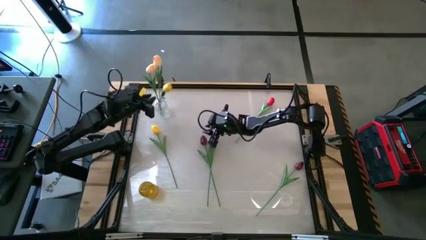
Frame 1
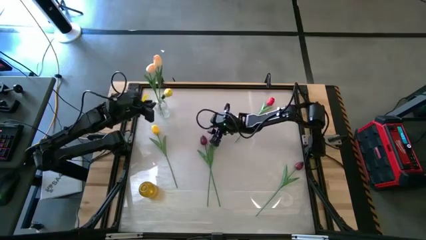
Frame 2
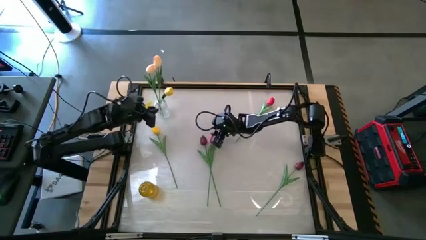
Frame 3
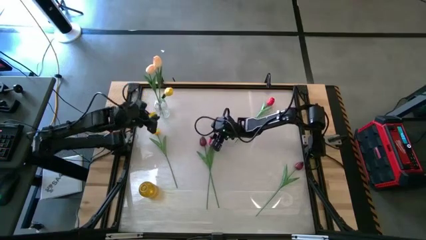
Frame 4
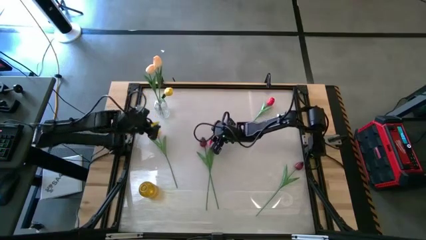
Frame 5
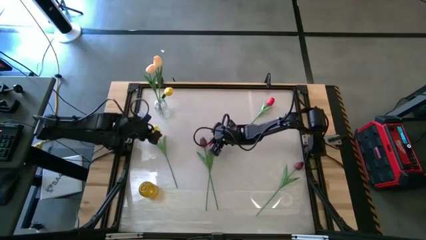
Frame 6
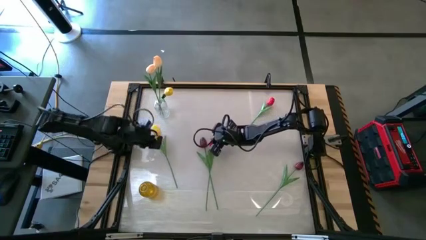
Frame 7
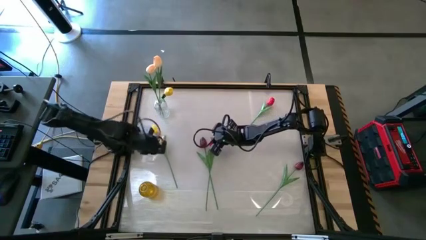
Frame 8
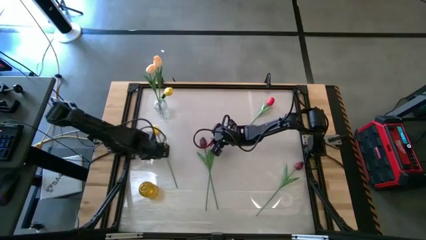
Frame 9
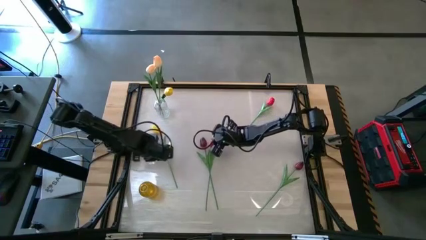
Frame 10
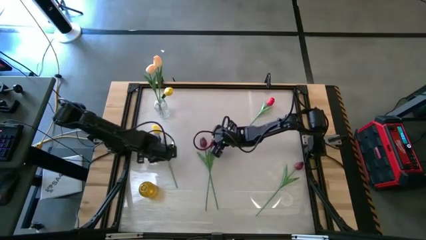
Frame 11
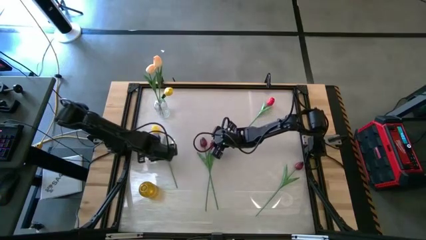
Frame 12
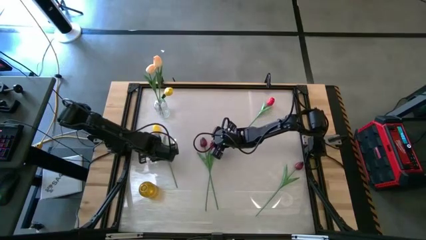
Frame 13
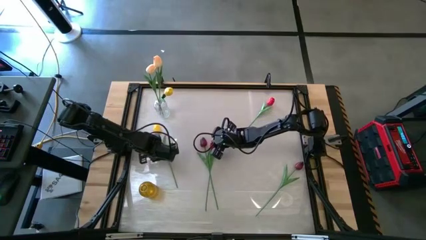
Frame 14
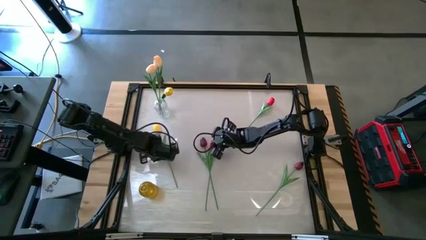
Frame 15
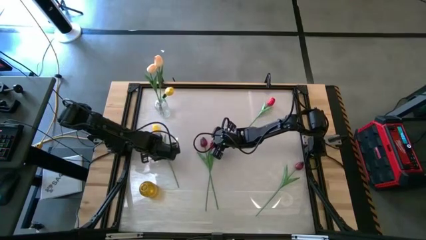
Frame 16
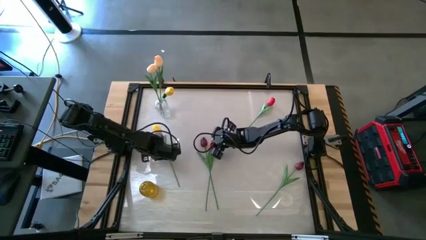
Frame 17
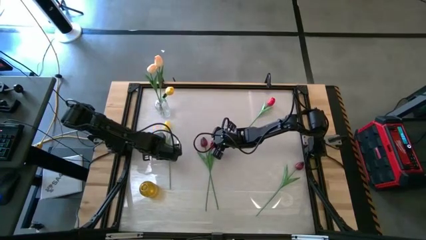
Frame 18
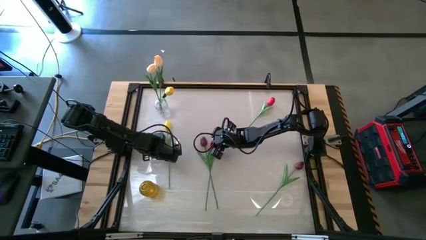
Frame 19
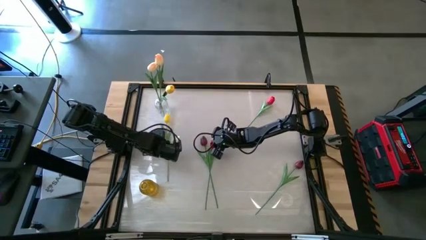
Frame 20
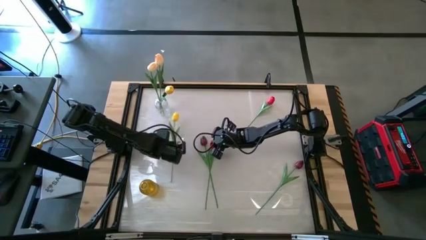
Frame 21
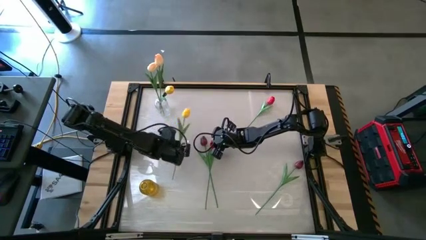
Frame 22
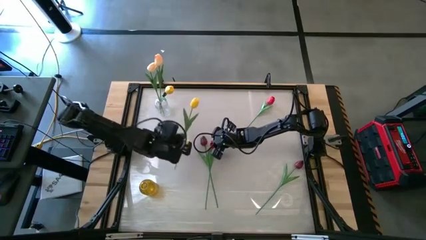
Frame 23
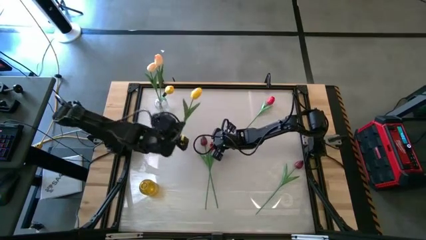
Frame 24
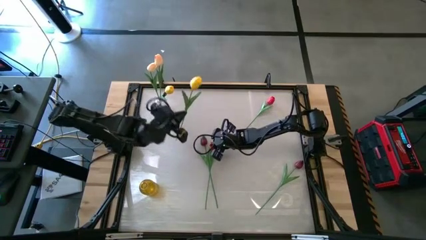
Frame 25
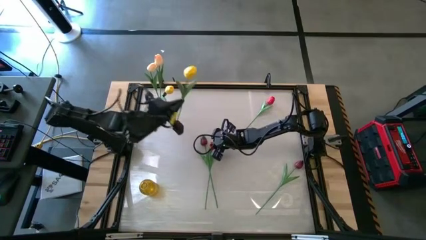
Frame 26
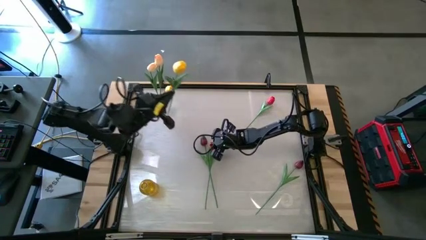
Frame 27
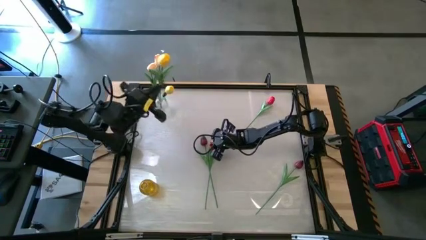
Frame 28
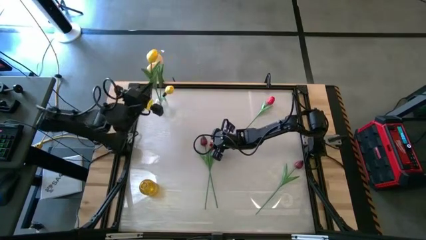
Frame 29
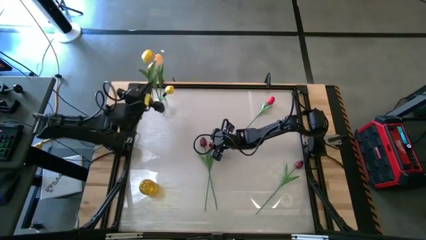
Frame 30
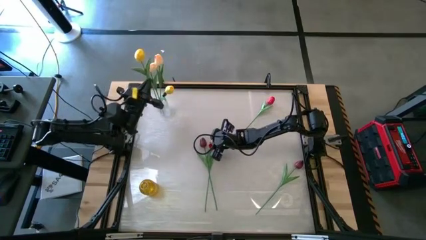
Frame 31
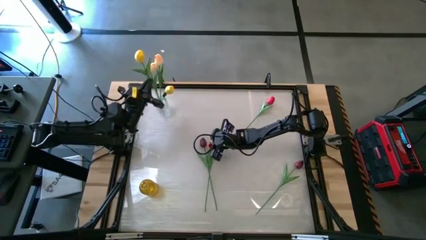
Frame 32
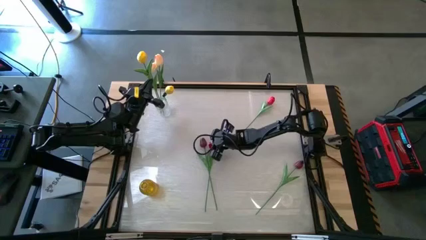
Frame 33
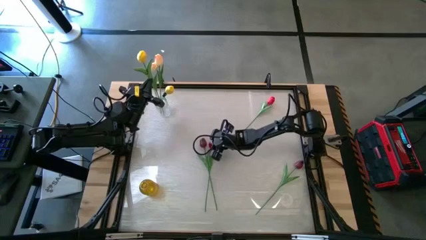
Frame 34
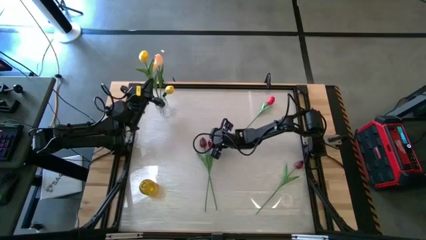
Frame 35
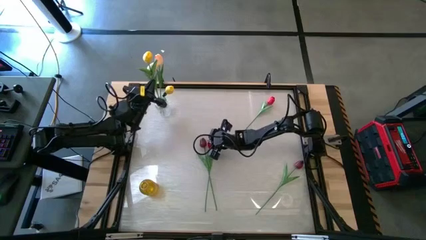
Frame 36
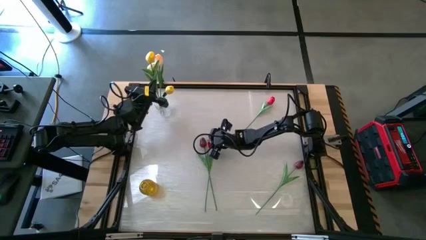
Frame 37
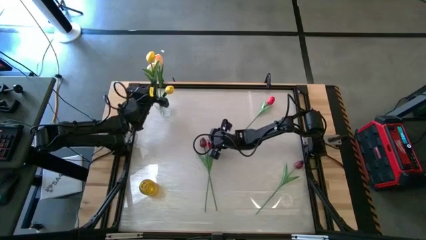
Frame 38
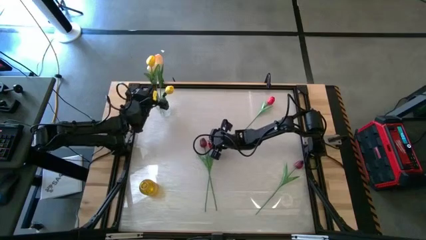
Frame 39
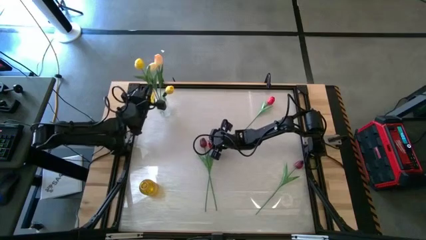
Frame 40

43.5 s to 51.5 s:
Task: Sort flowers into vase by color
Put the yellow tulip into the transparent vase

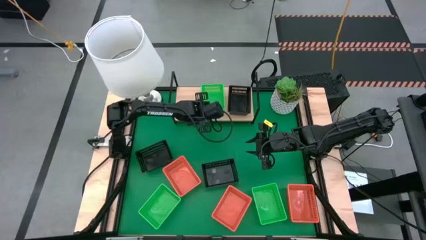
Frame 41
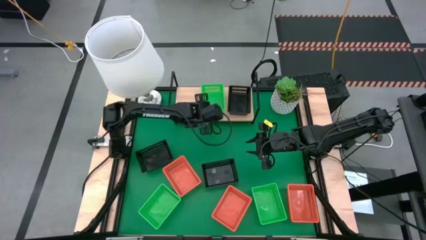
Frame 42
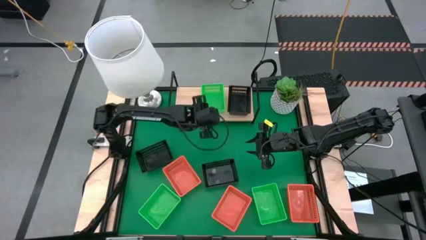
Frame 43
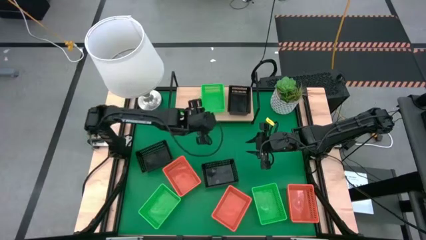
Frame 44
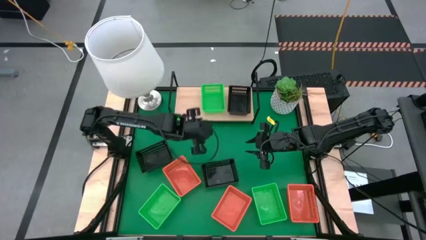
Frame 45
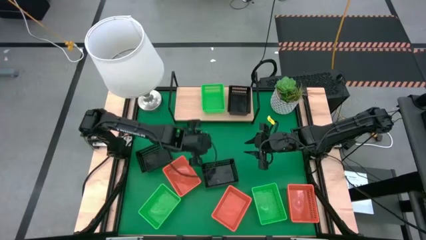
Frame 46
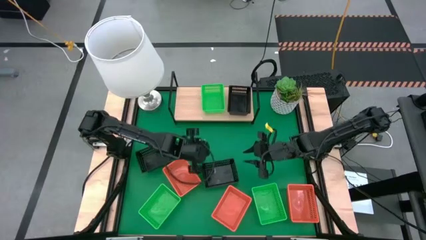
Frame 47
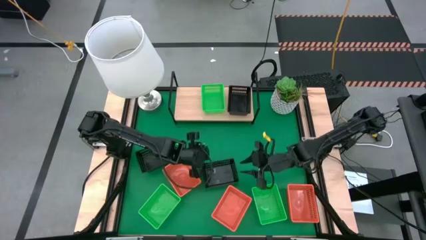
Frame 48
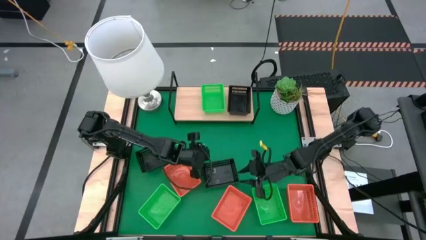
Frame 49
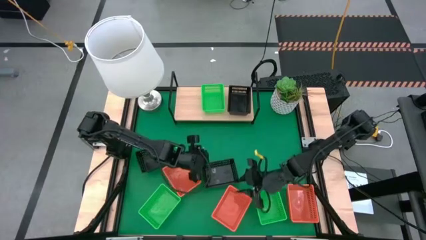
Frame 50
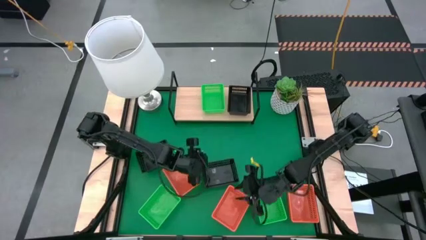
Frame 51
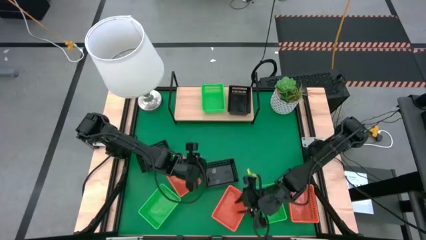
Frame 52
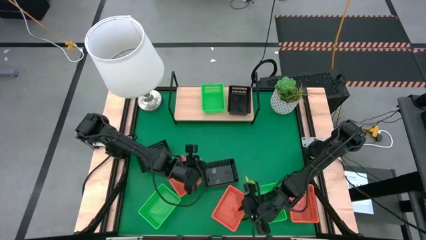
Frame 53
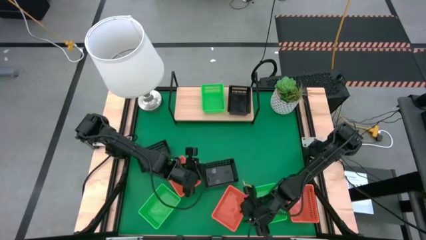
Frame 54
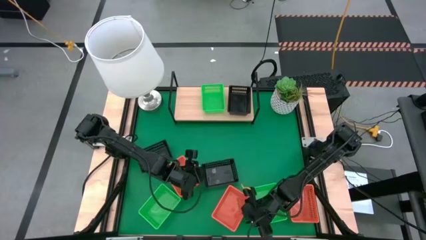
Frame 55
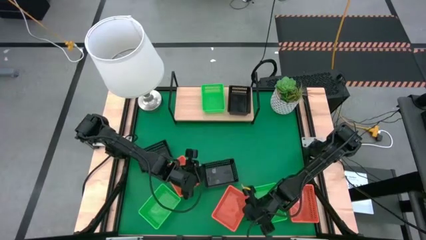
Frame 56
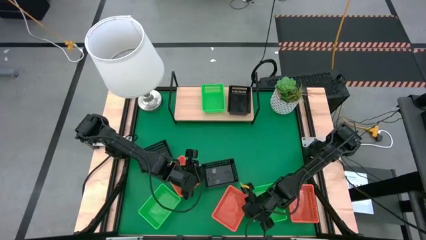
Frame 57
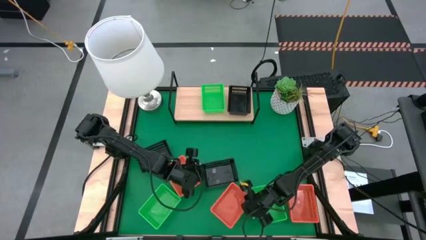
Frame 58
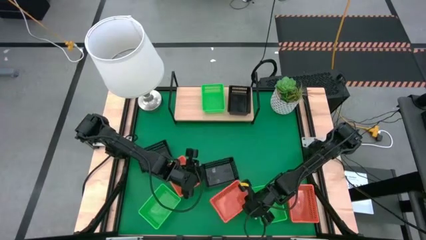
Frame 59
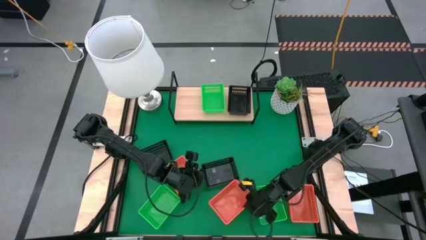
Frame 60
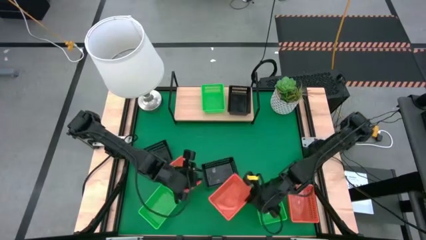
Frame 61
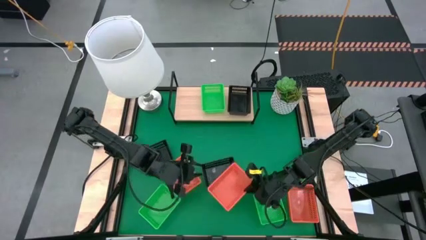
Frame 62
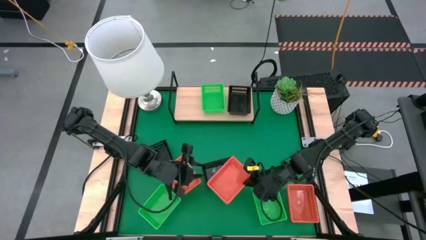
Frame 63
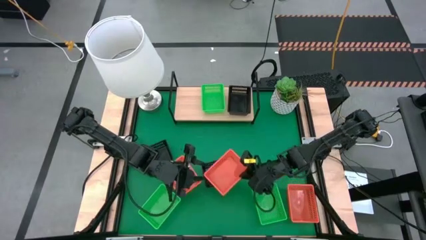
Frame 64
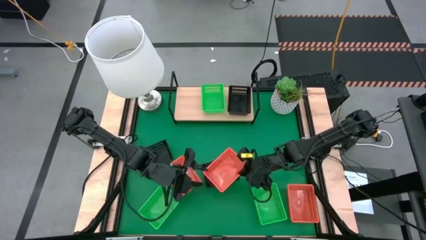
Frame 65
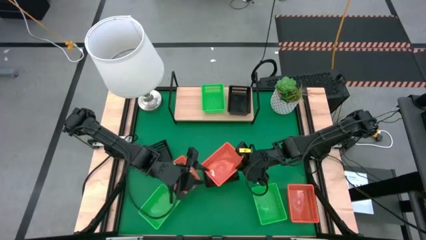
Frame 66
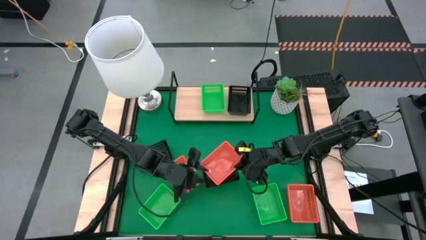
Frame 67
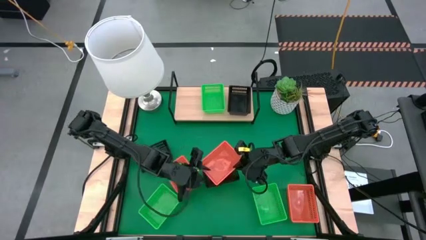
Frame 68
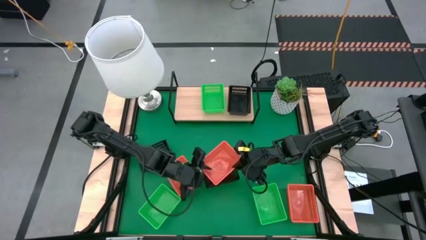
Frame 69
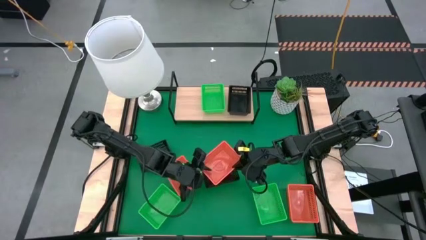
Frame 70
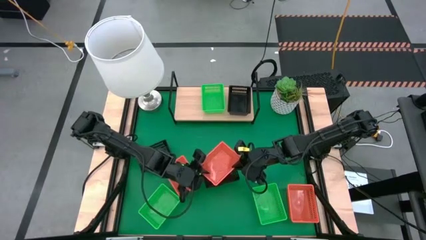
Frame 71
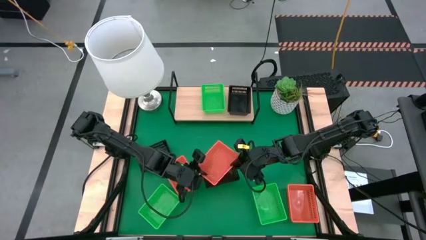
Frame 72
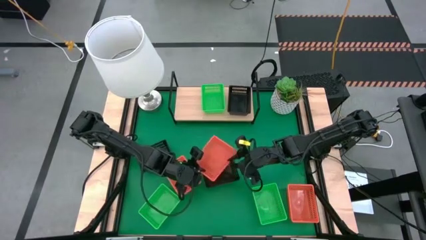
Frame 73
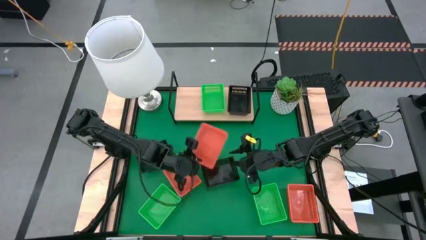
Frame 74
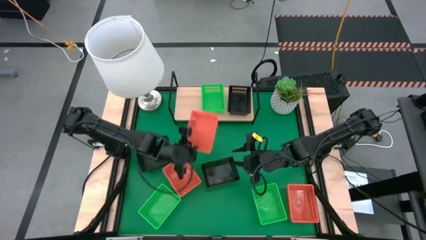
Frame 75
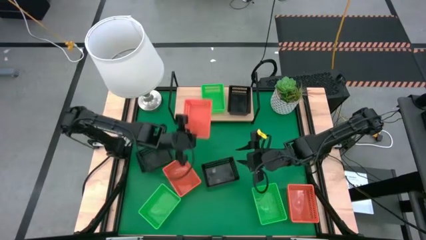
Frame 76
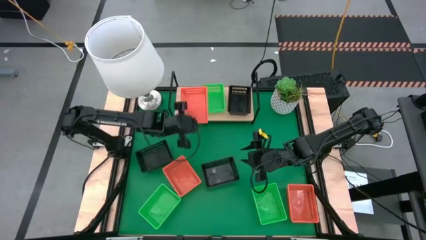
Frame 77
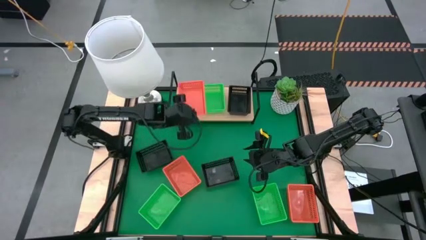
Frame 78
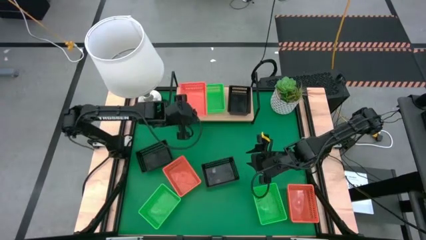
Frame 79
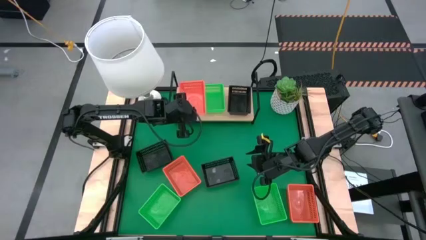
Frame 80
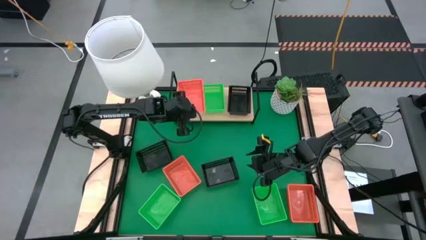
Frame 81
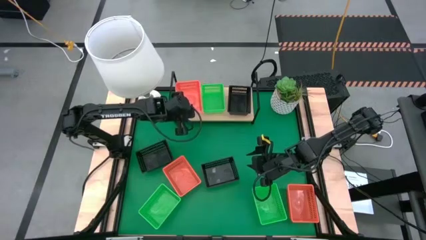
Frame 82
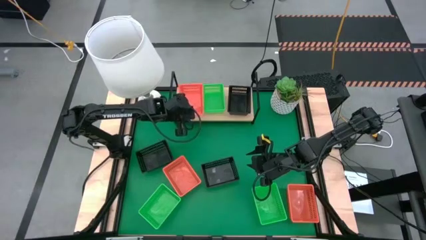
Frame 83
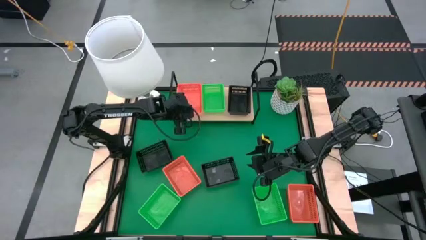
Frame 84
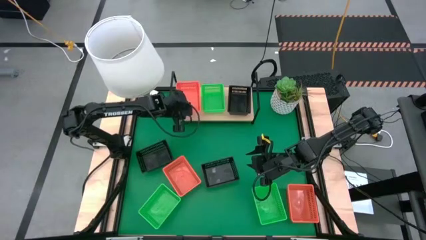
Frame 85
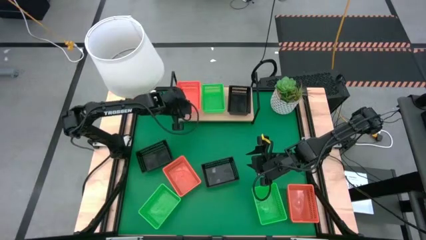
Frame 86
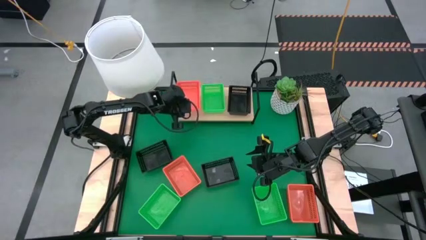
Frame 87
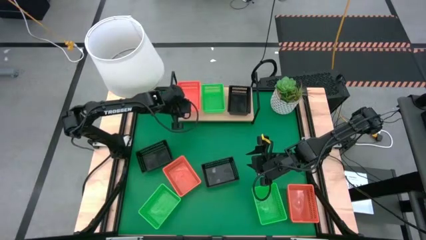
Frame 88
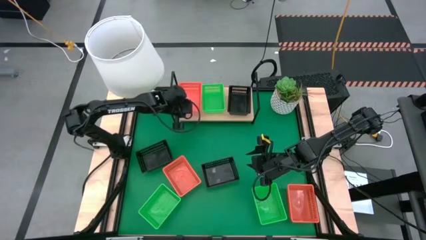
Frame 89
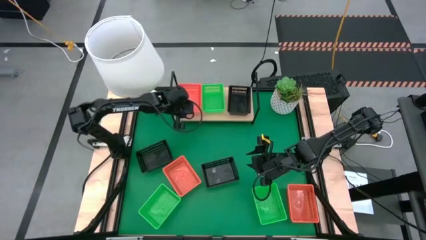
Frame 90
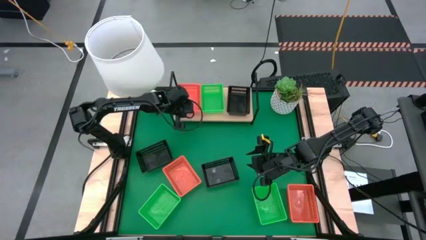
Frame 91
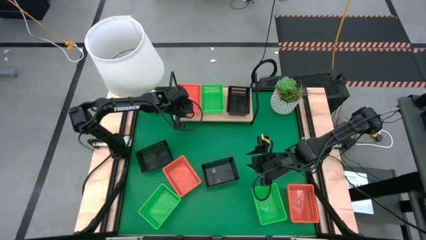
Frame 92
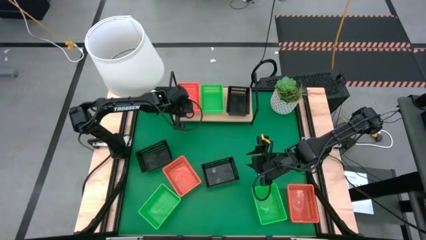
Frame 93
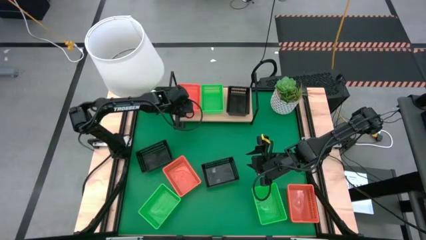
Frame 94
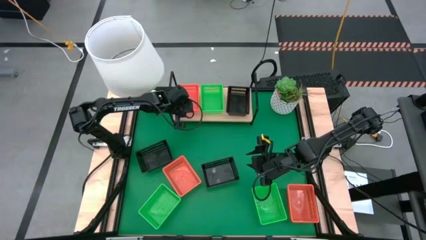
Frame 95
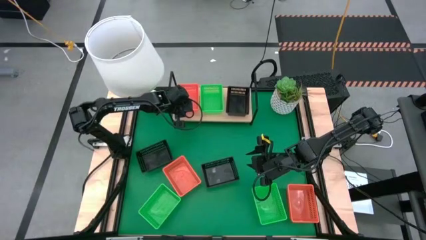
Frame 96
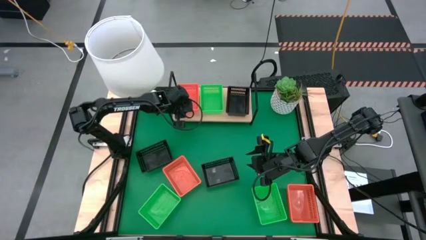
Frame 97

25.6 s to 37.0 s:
Task: Stack baskets on shelf by color
Put the middle orange bin on the shelf
